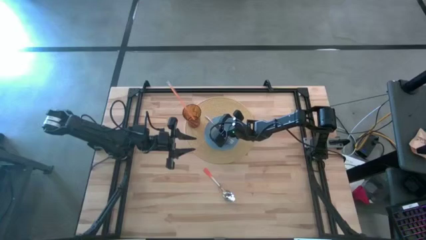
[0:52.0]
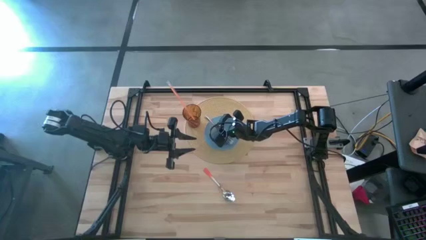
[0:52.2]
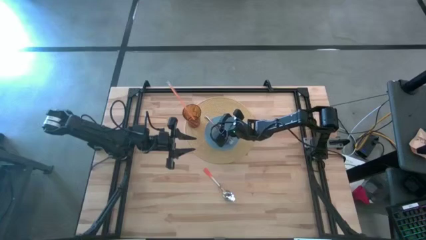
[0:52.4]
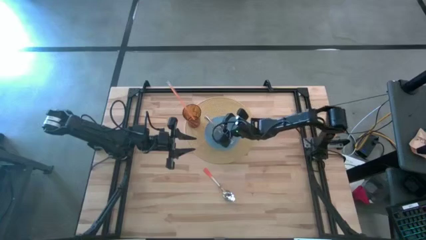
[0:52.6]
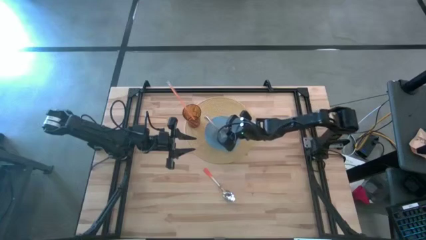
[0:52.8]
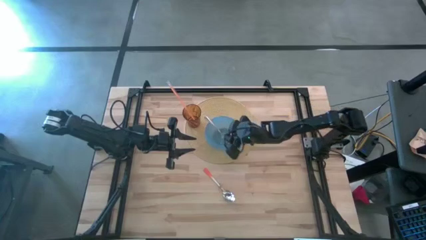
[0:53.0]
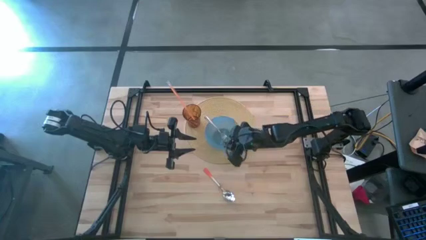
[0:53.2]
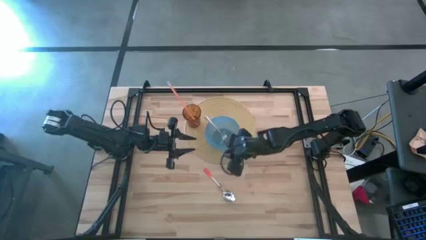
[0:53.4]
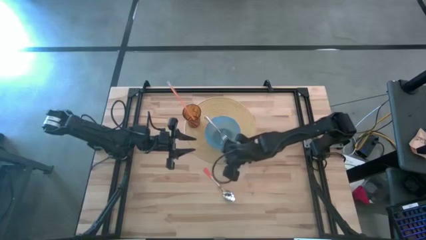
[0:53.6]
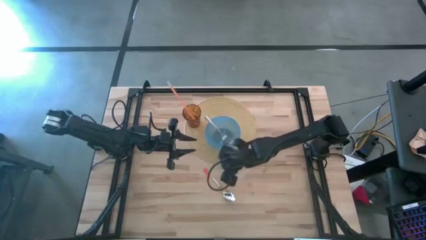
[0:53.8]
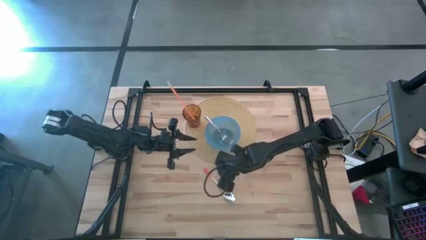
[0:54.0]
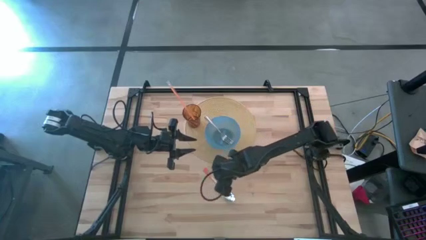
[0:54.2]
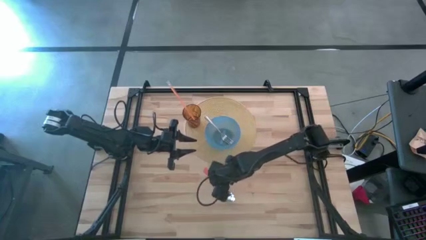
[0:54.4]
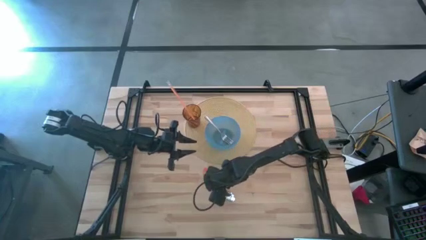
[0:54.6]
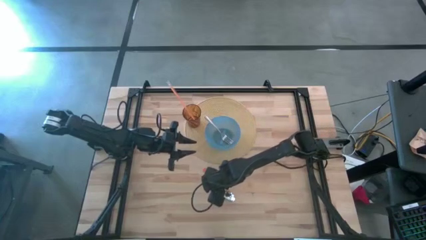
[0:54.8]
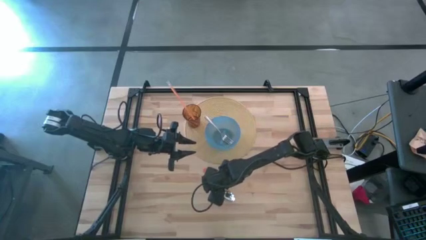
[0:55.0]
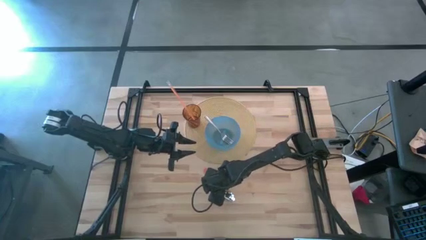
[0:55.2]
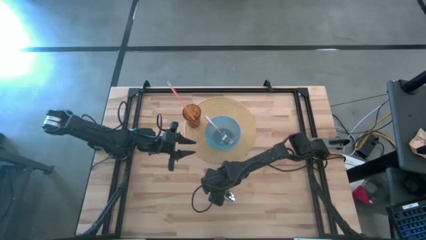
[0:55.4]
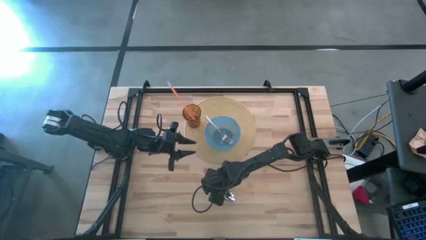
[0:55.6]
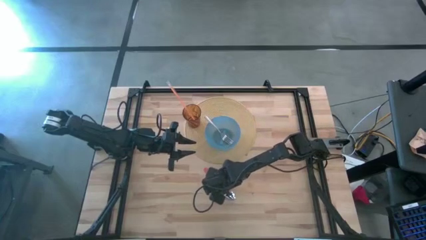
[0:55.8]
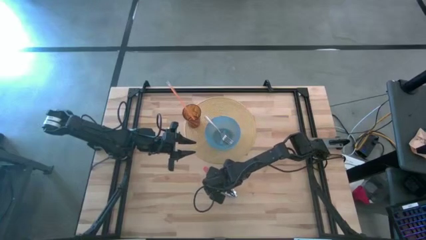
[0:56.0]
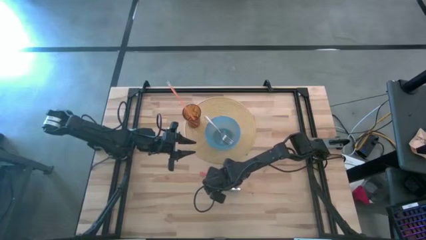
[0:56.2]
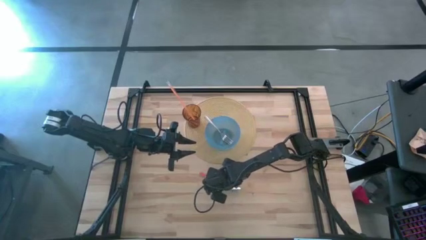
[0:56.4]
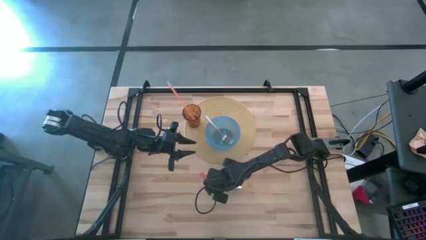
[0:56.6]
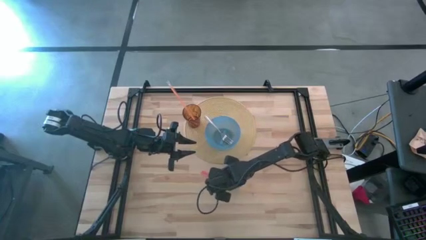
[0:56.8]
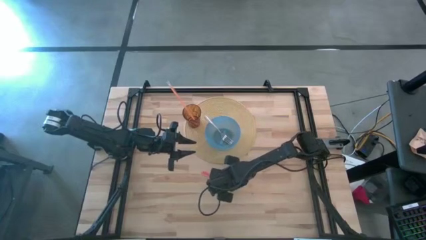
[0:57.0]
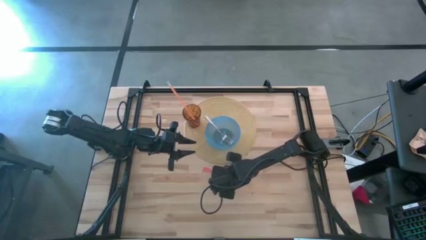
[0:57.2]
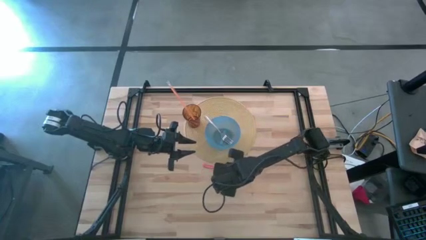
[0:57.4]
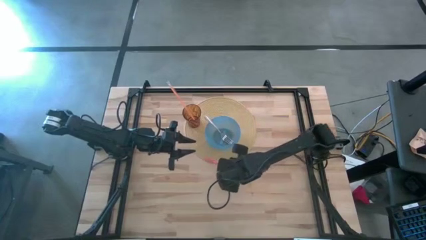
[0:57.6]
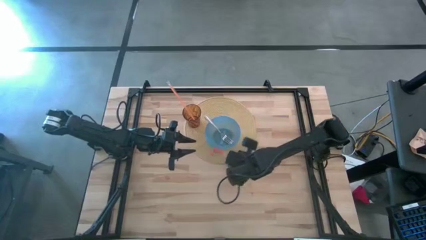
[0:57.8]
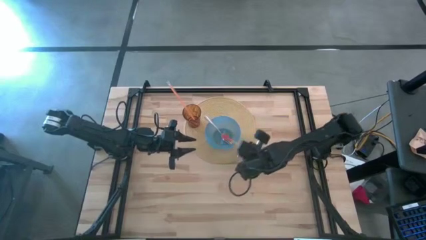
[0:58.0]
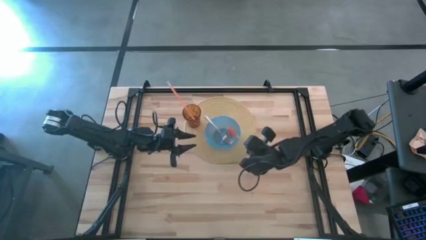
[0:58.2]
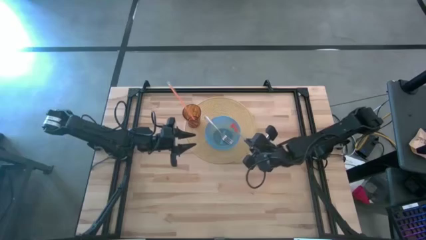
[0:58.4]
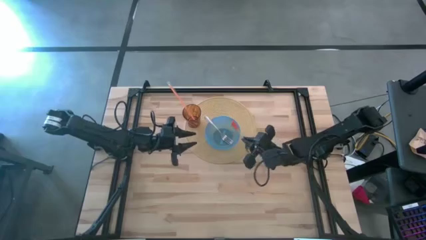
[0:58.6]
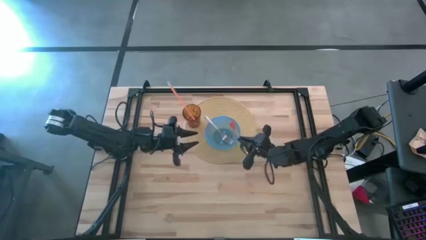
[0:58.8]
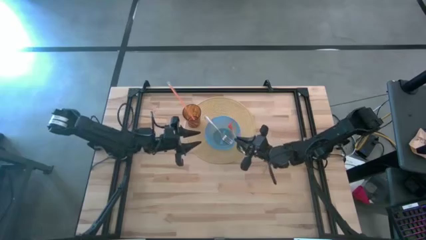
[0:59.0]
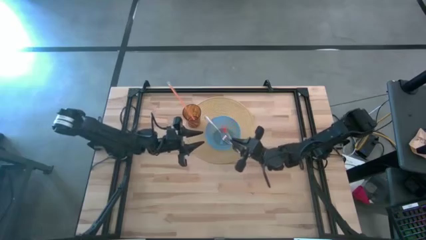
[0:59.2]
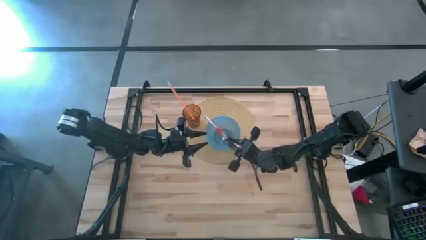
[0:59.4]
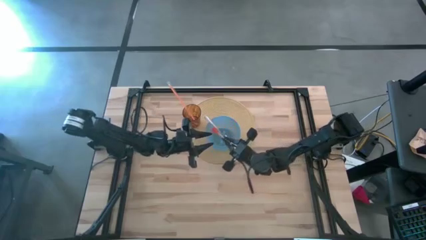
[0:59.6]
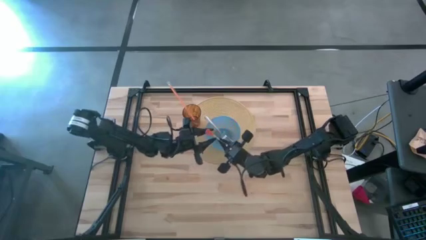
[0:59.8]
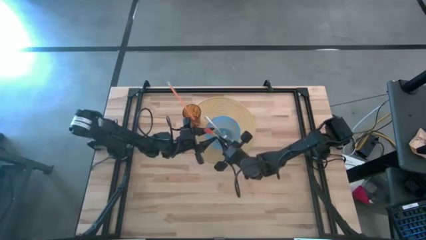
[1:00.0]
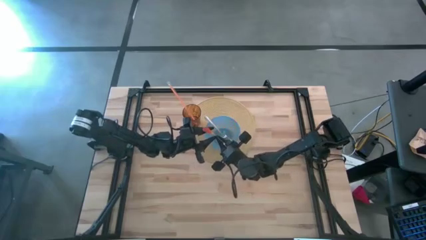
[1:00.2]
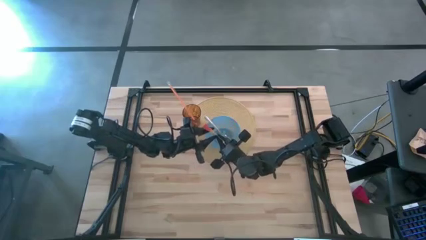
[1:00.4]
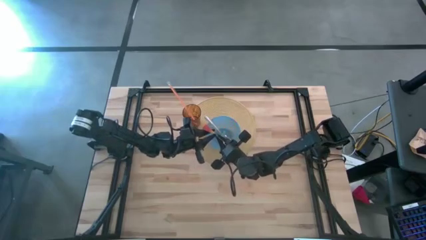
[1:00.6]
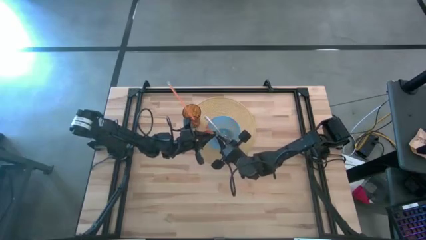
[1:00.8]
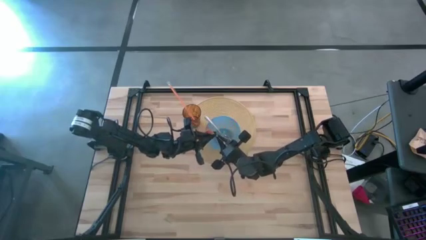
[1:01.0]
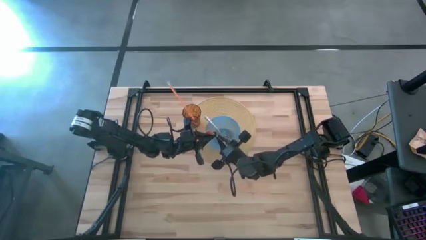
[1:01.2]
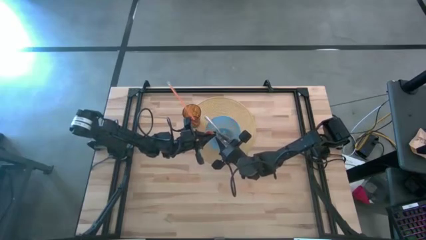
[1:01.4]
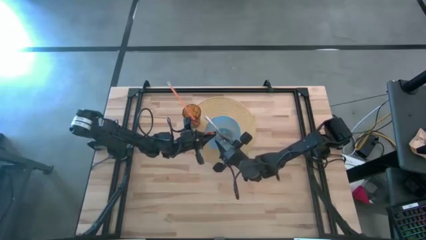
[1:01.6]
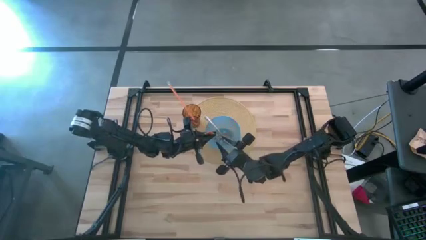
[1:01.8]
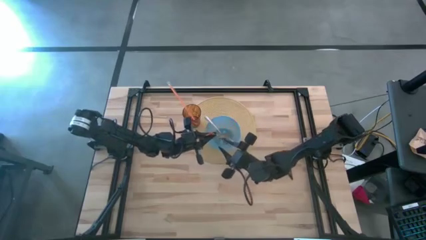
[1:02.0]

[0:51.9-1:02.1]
Task: Pick & Place Utensil
Put the orange spoon into the blue bowl on the brown mat

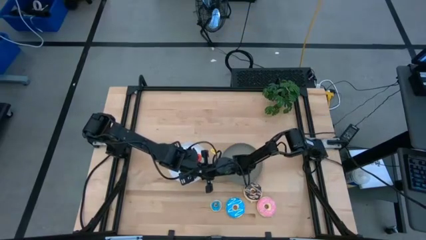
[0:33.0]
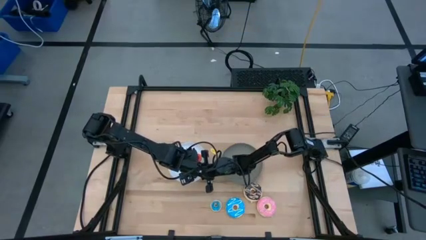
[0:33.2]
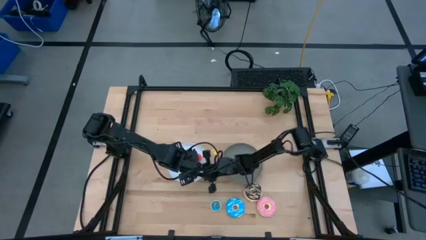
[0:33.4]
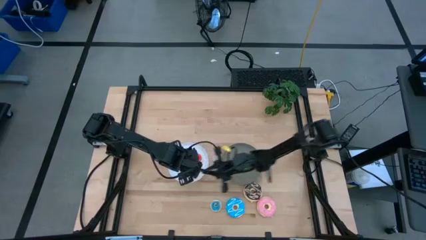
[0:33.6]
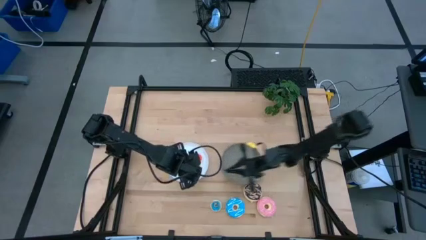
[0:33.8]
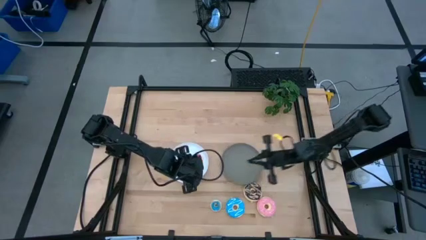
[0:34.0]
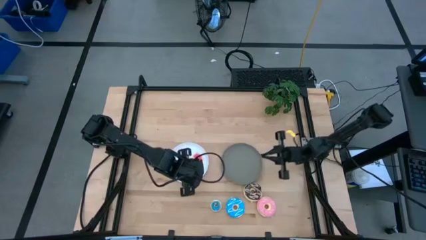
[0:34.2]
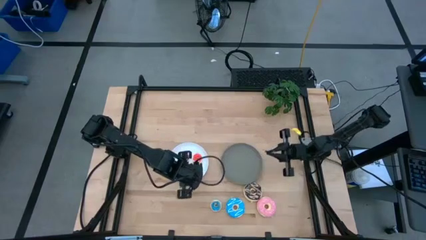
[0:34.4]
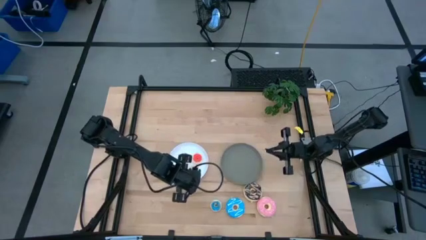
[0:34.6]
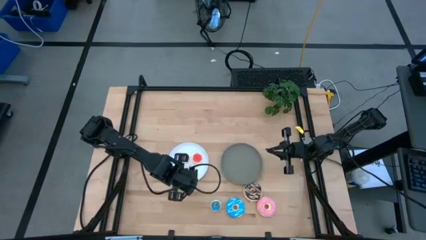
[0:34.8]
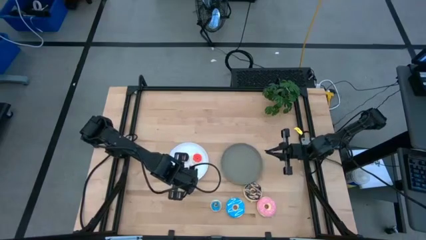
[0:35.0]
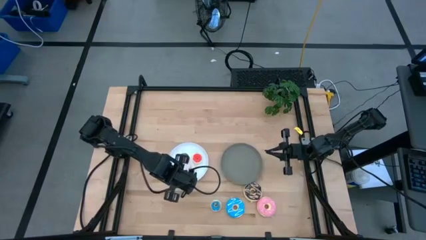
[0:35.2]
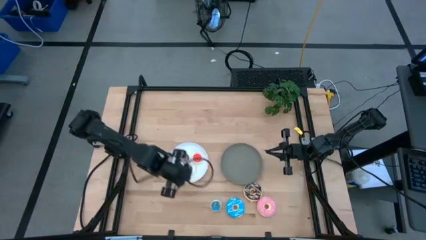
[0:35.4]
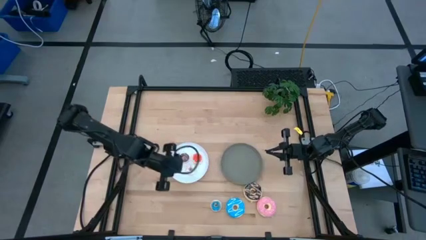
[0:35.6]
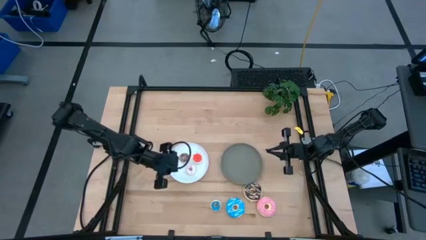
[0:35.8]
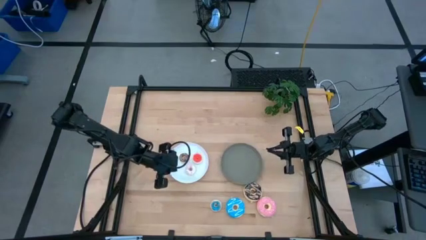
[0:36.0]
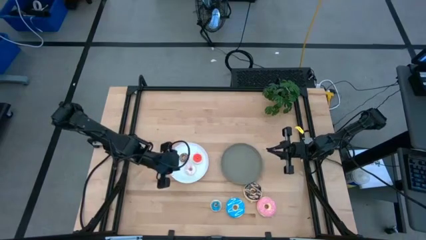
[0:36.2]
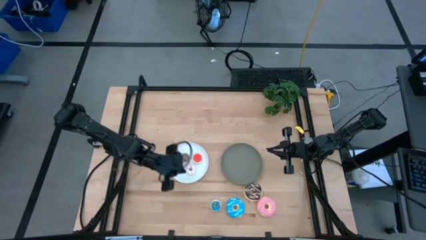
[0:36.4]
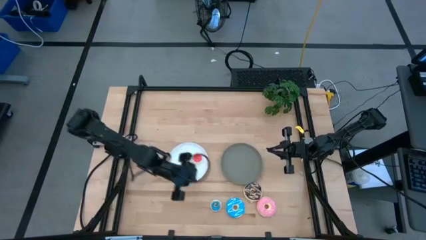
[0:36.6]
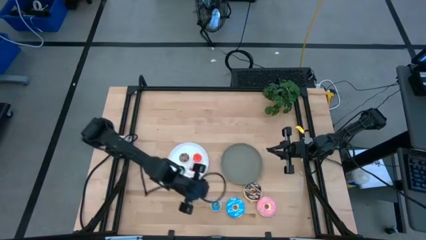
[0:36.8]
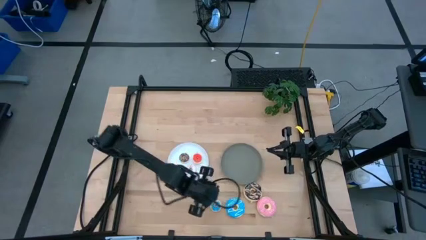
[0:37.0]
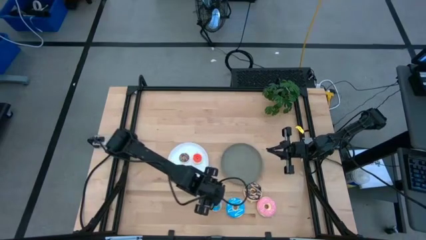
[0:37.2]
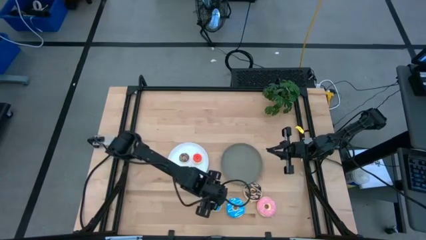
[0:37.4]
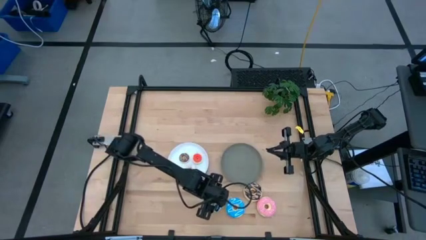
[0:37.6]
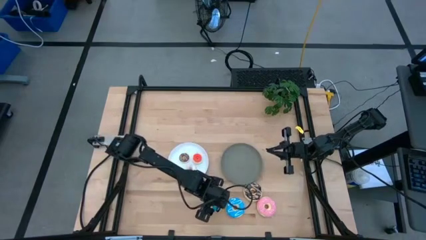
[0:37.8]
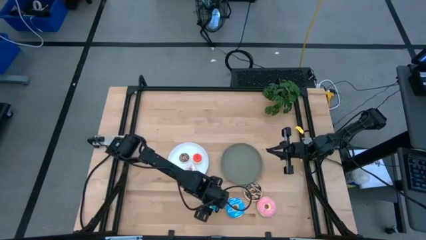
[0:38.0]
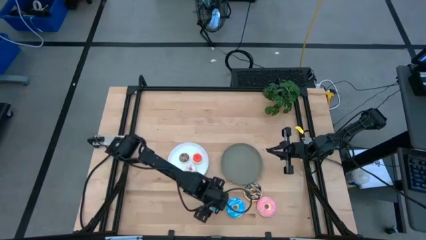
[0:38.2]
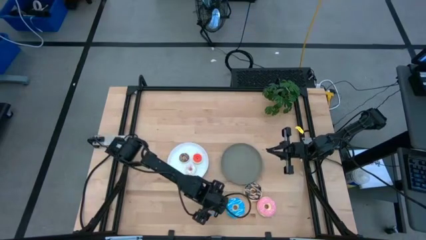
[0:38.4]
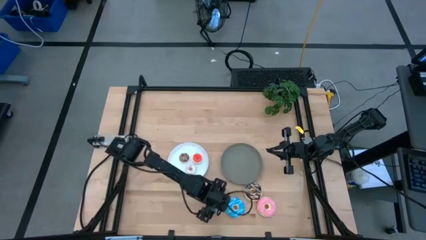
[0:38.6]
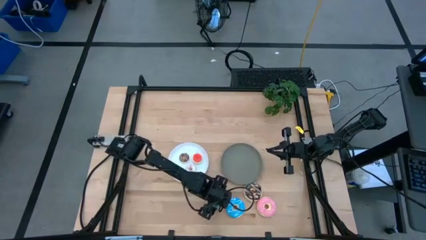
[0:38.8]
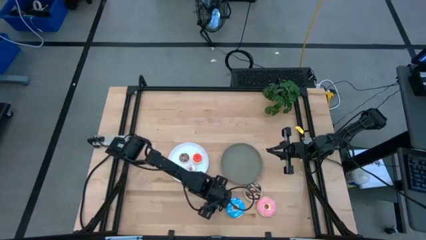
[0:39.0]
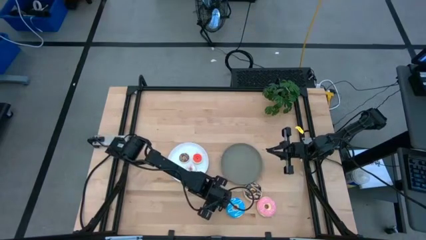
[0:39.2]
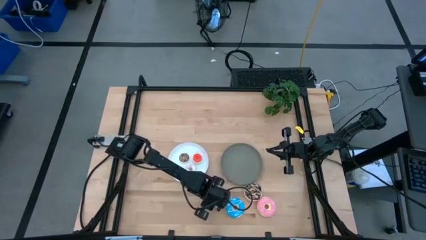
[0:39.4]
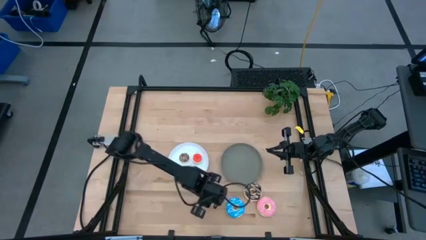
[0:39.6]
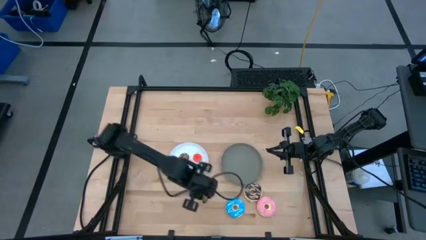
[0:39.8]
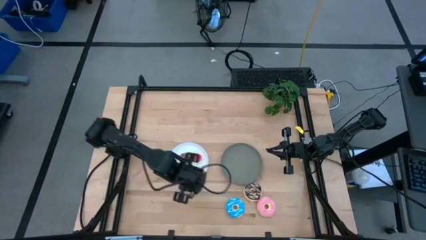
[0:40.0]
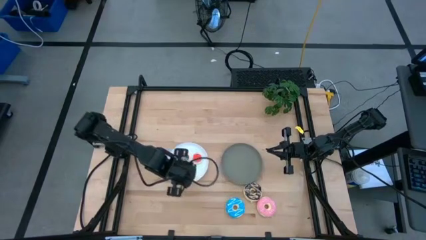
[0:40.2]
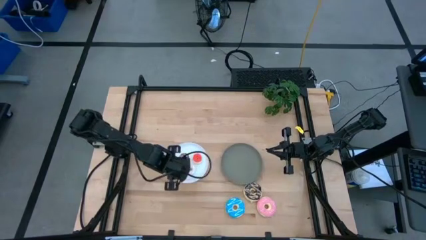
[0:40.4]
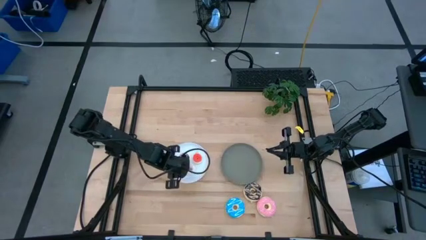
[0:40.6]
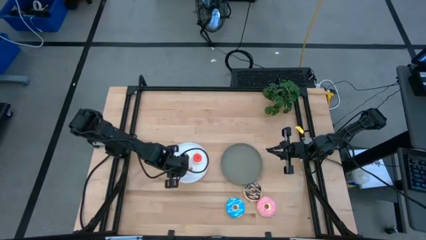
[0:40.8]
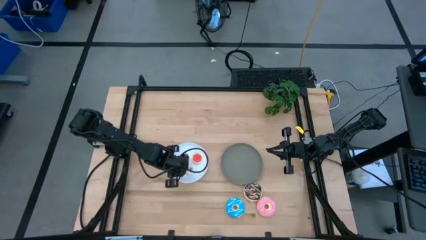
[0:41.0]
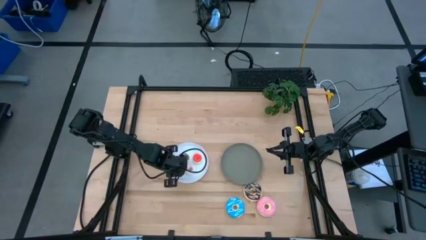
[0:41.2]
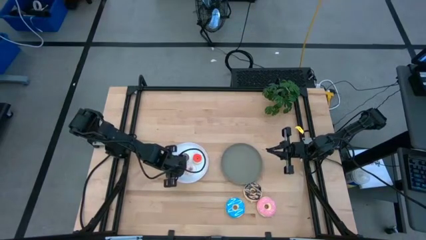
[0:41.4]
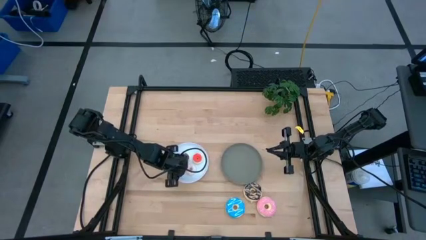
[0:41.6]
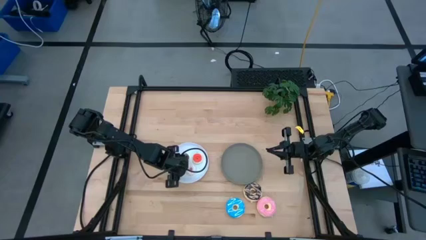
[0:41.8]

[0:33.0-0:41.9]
Task: Pick & Place donuts
Put the small blue donut on the white plate
